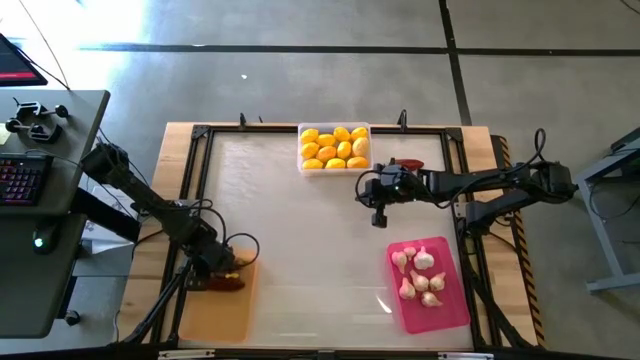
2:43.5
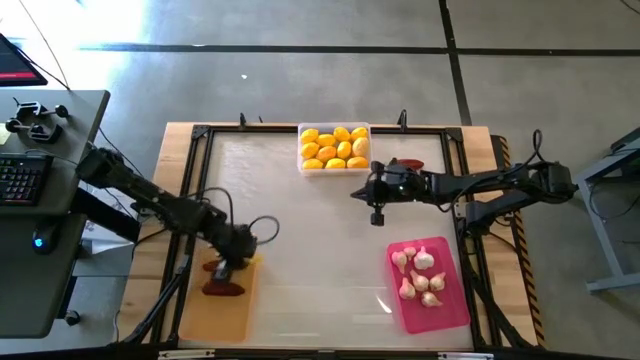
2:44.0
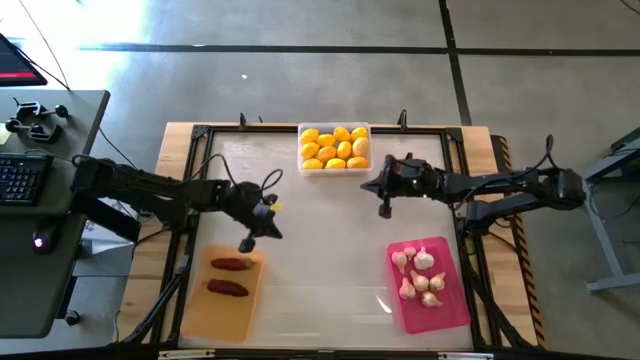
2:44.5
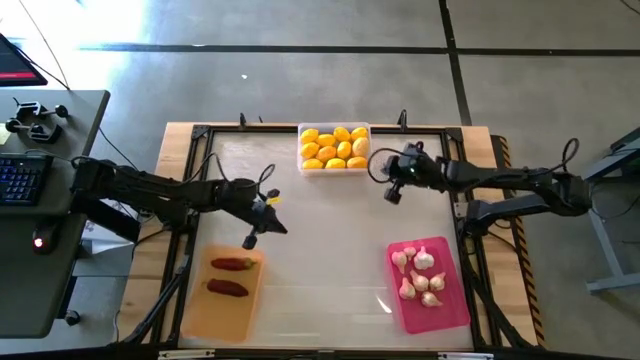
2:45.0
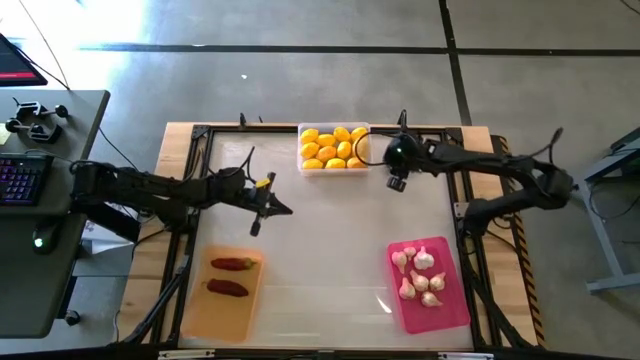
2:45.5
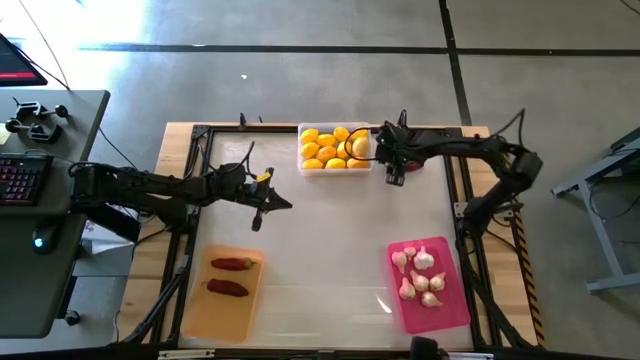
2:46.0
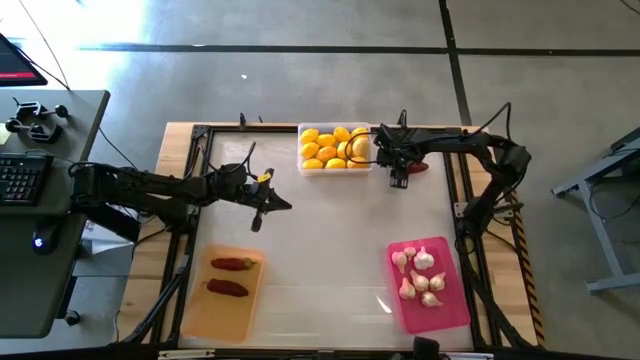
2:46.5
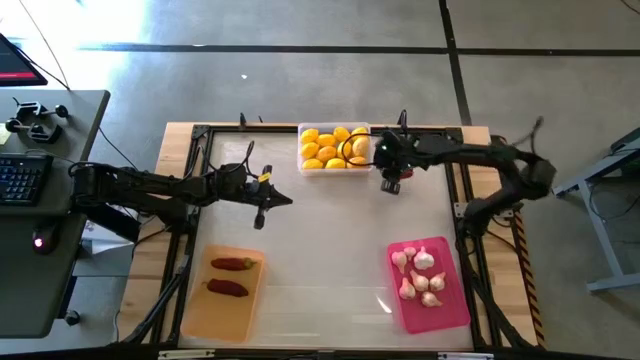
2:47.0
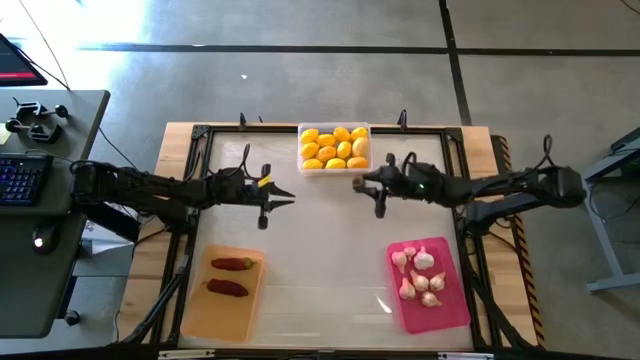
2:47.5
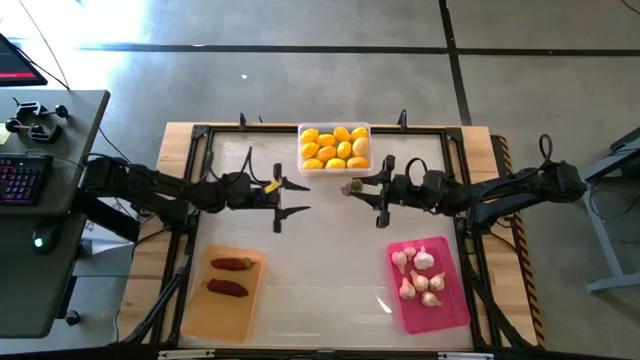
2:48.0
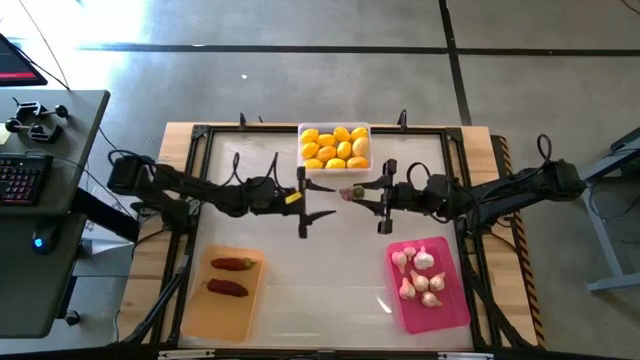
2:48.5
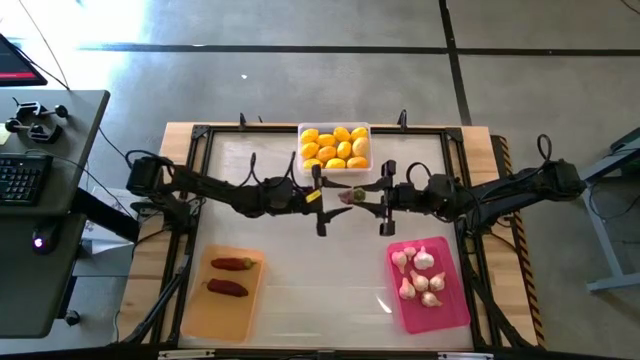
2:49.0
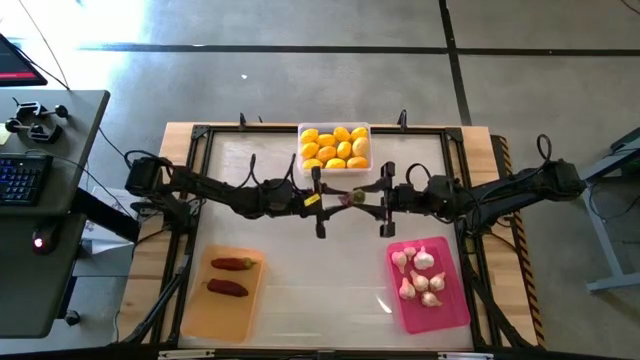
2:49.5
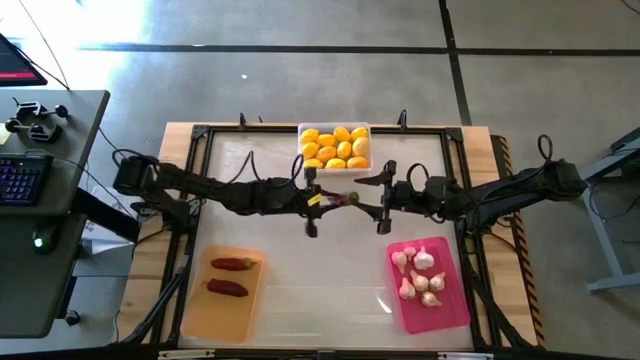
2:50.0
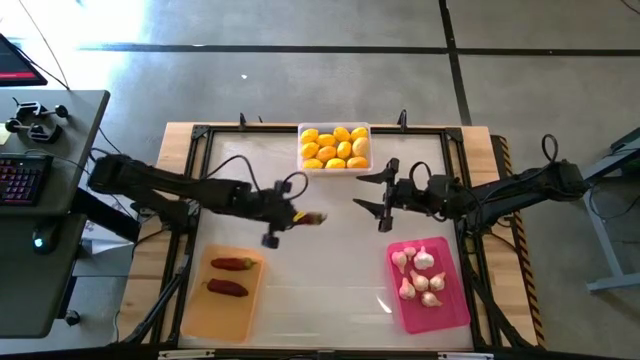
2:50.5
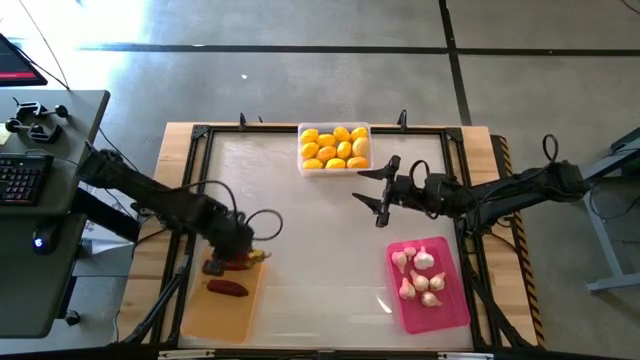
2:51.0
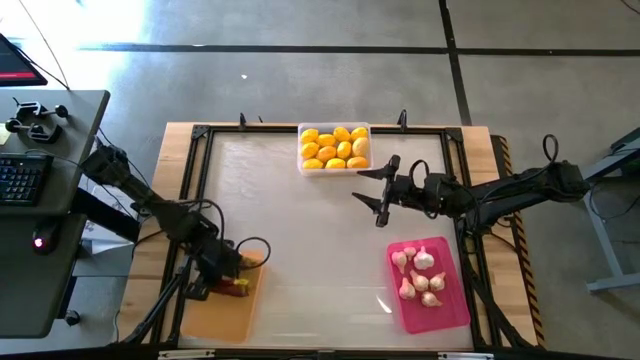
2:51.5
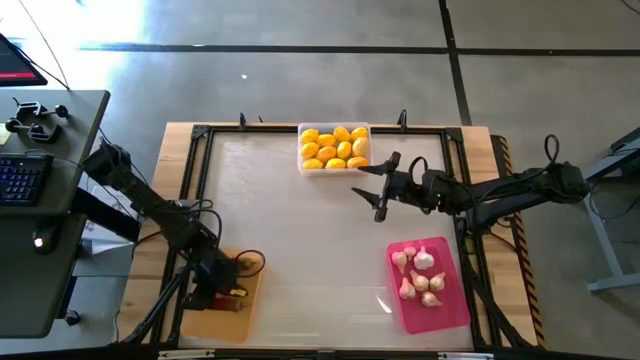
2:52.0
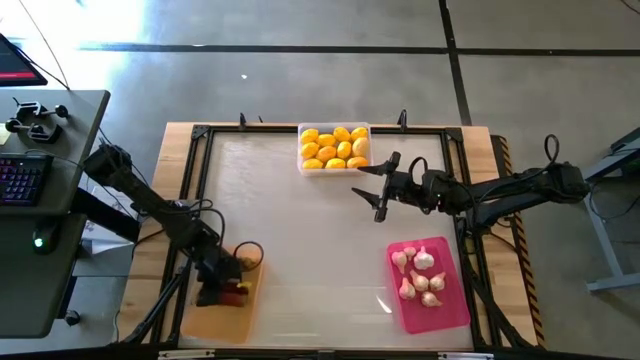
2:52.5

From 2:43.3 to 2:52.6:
Task: Sort produce into baskets
Put the chili pepper into the yellow bin

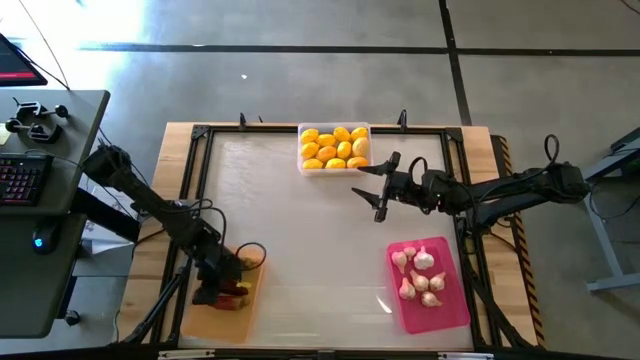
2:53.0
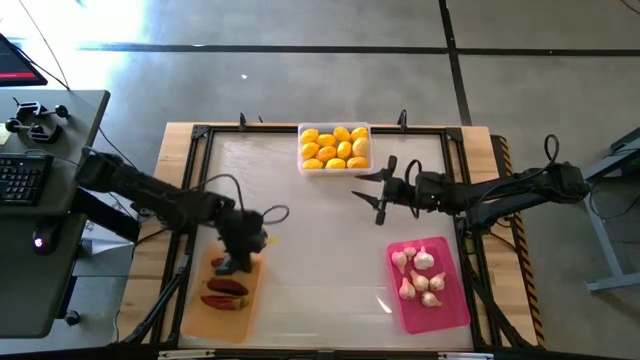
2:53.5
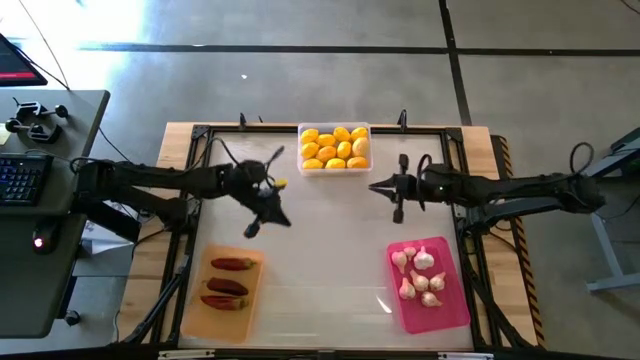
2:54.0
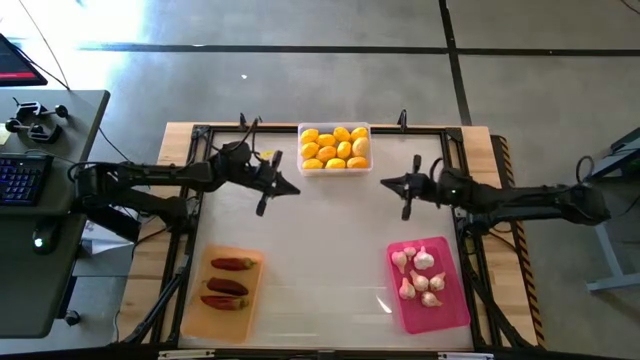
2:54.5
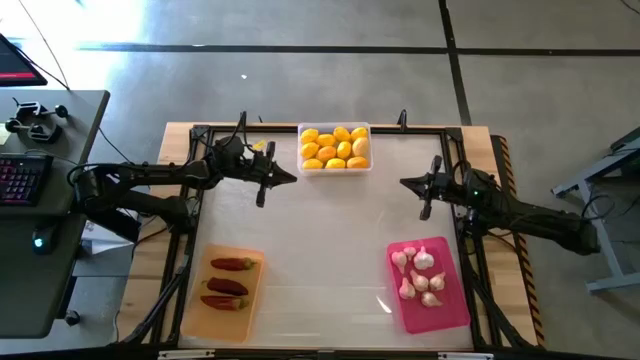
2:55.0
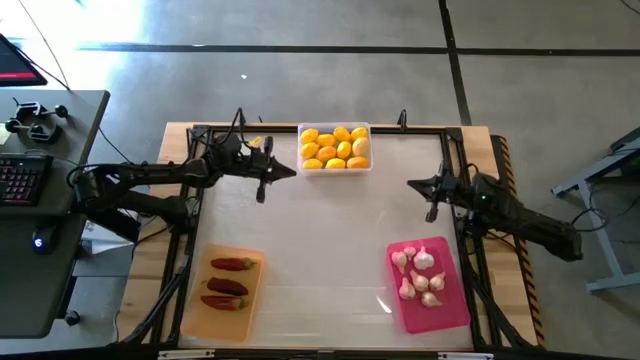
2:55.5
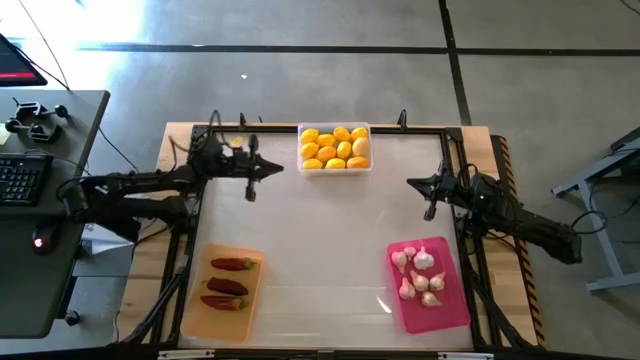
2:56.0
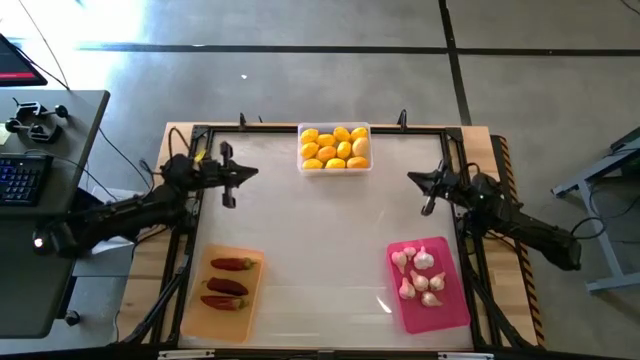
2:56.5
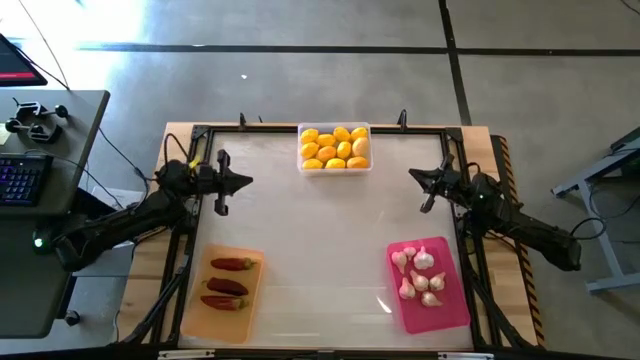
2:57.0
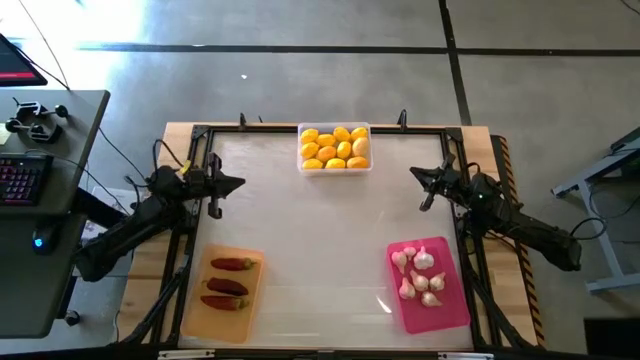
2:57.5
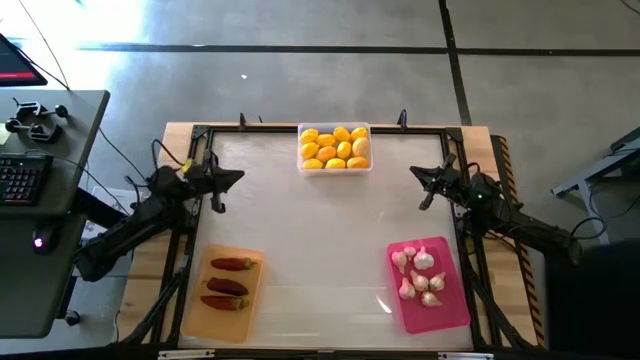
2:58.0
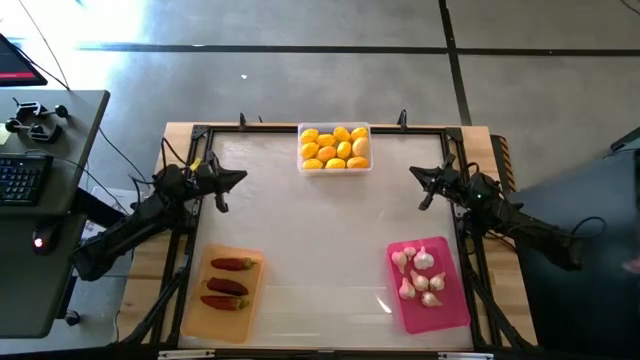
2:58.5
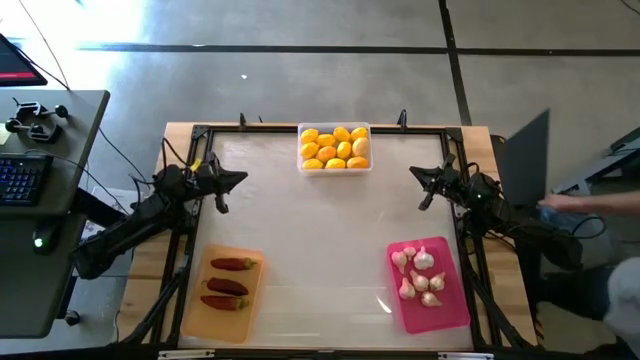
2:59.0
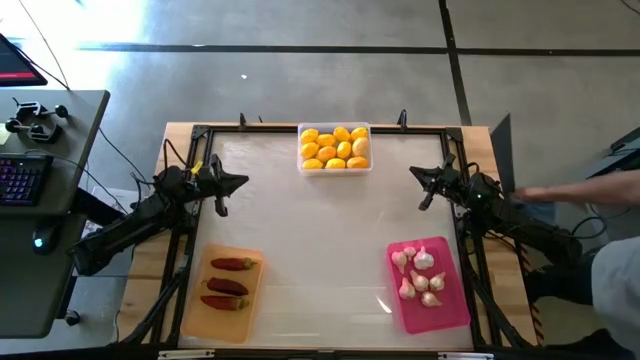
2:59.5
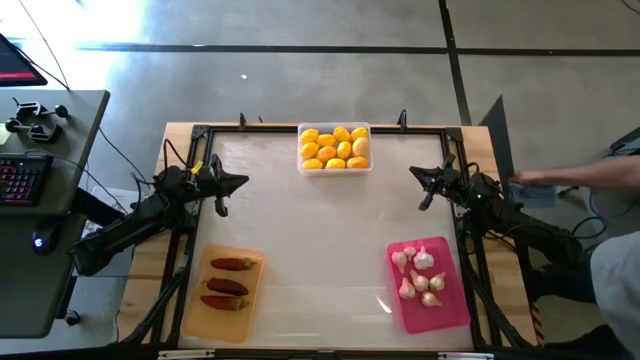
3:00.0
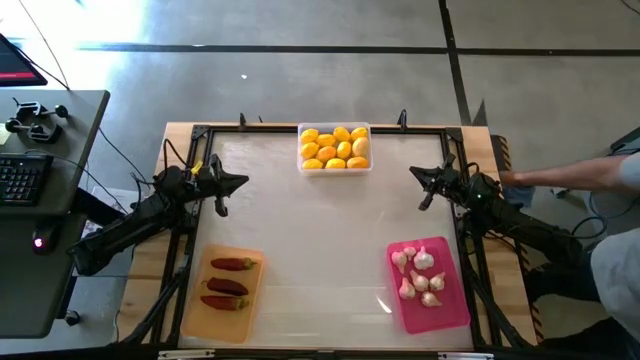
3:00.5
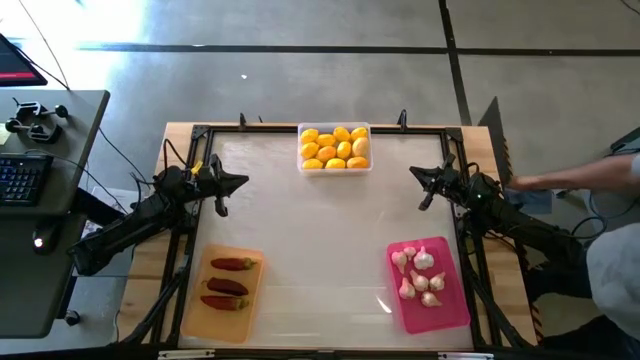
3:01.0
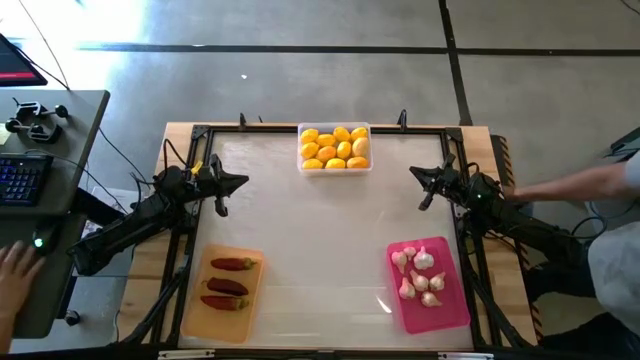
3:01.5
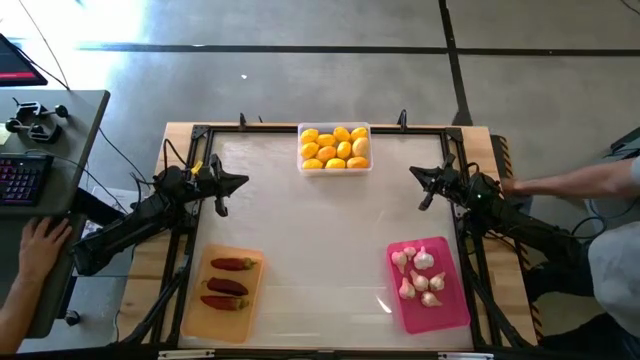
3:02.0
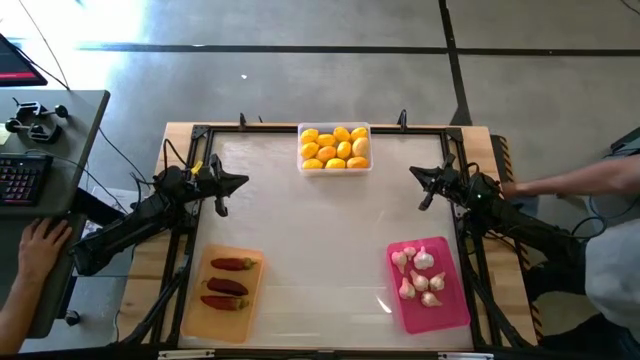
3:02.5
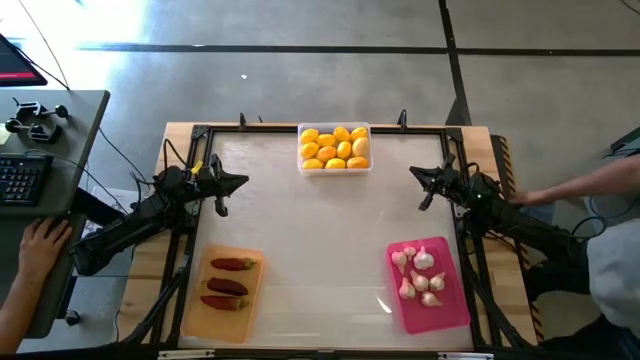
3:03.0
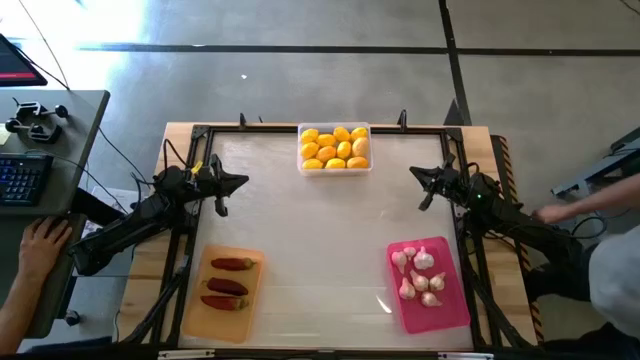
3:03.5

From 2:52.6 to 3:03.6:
Return to Home Position

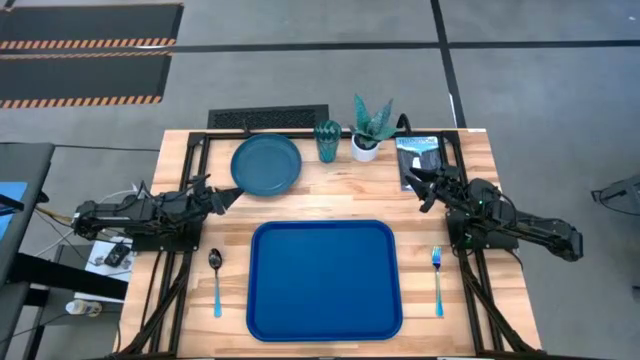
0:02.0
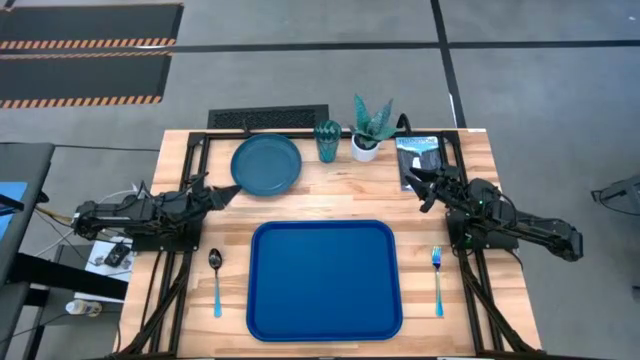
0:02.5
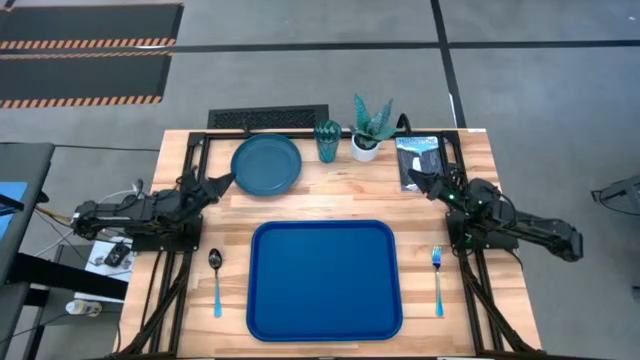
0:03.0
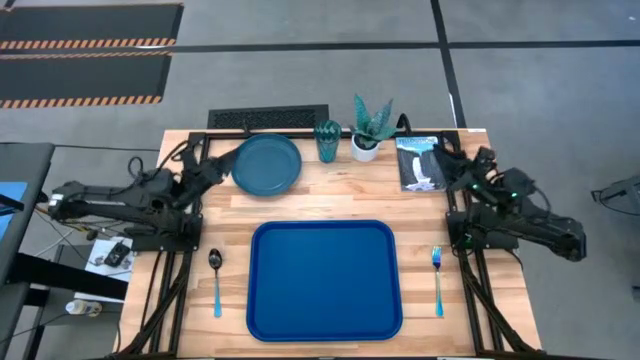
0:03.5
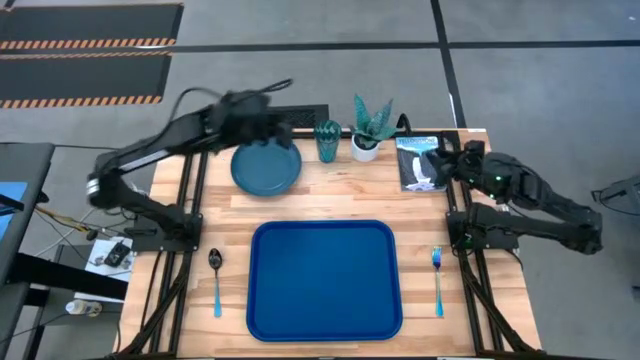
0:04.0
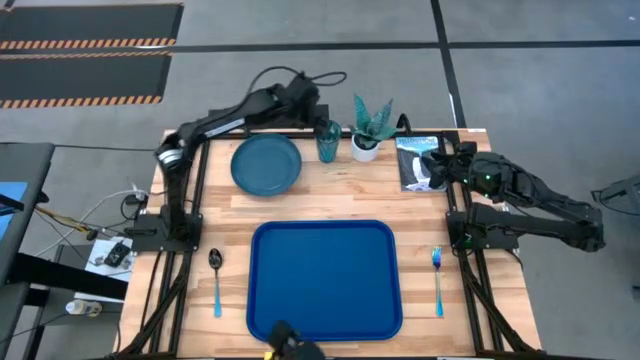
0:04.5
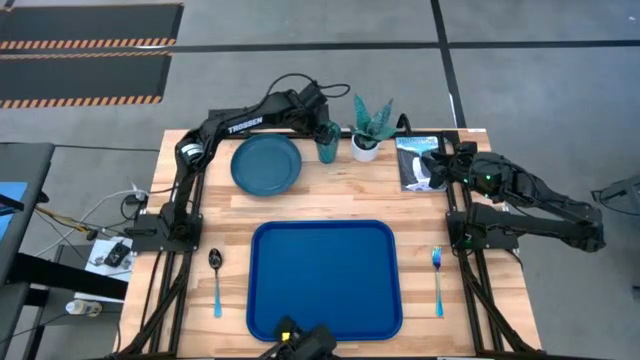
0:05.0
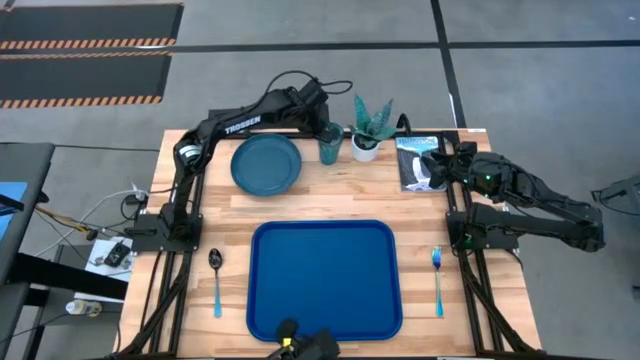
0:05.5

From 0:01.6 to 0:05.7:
Task: Pick and place plate/cup/fork/spoon on tray
Put the blue cup on the top right of the blue tray
